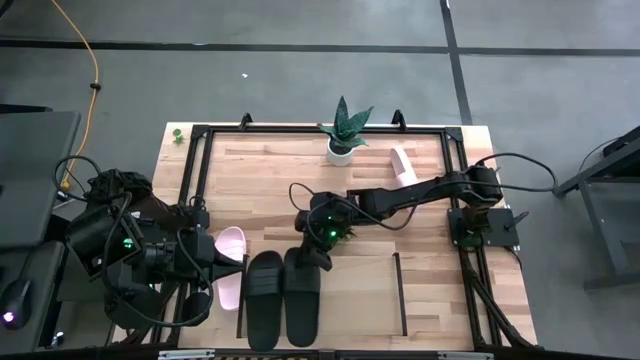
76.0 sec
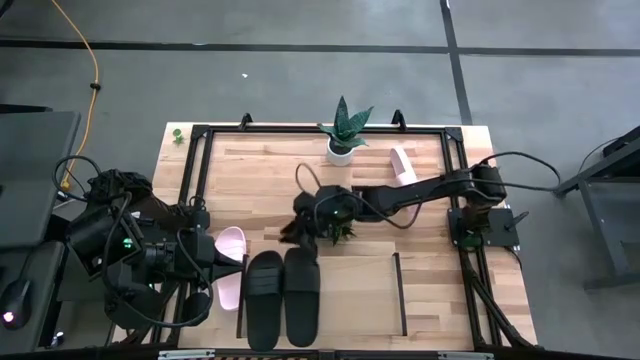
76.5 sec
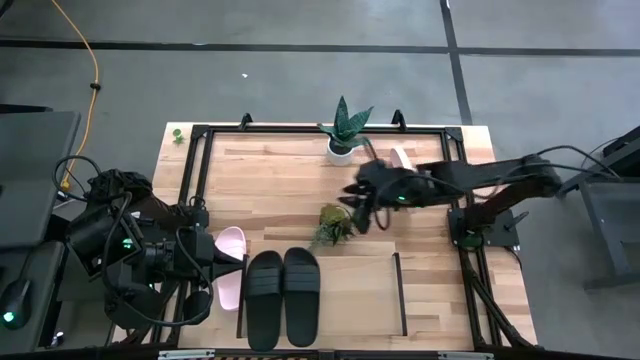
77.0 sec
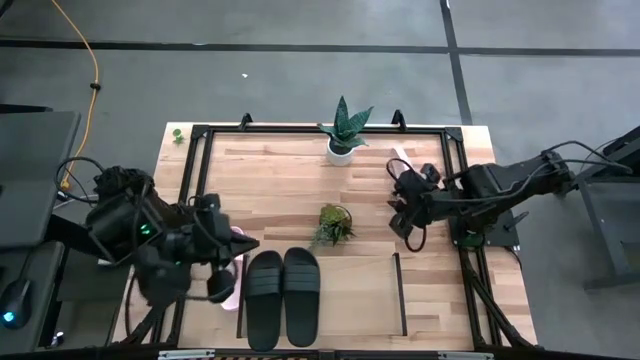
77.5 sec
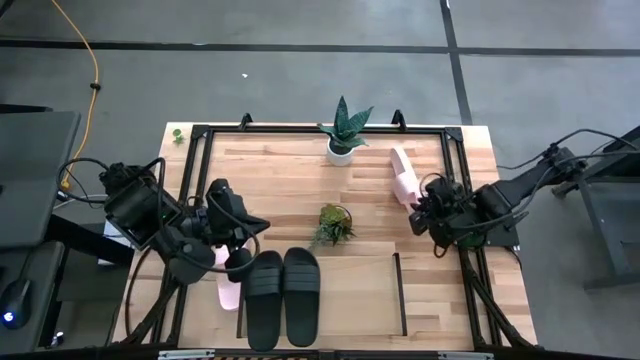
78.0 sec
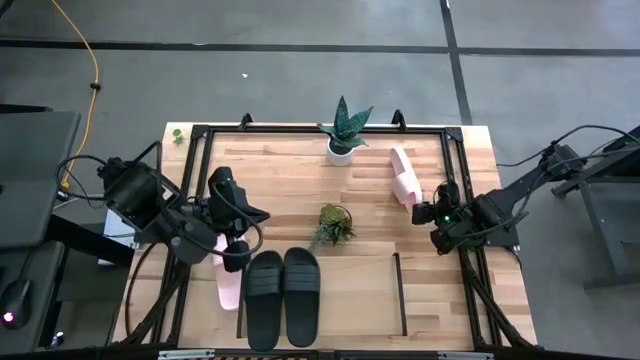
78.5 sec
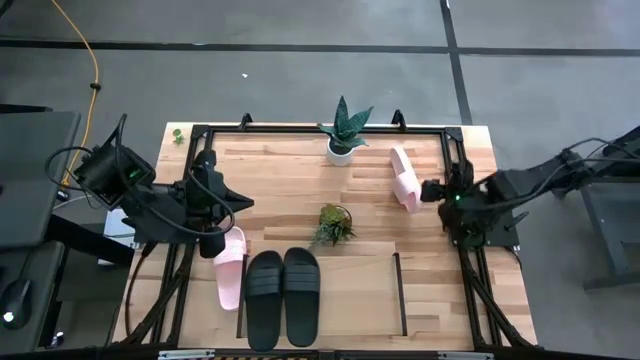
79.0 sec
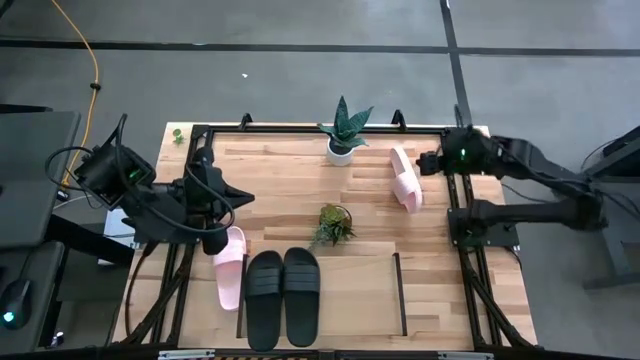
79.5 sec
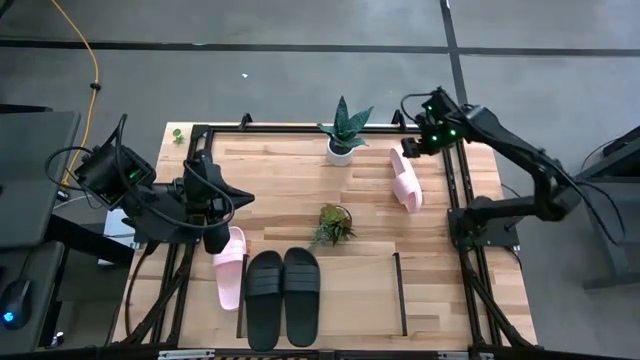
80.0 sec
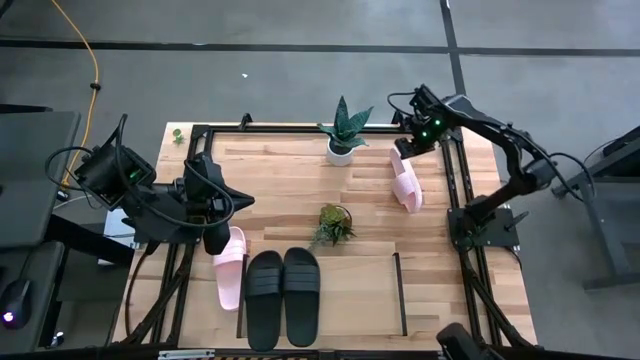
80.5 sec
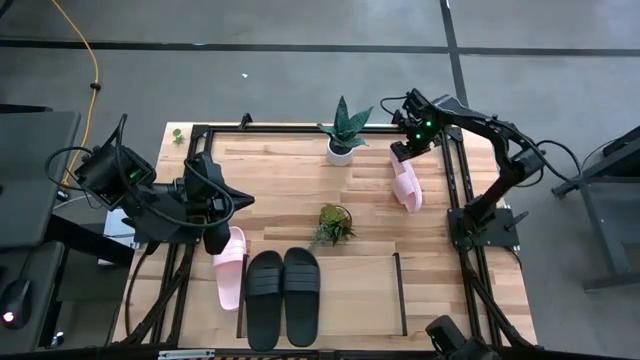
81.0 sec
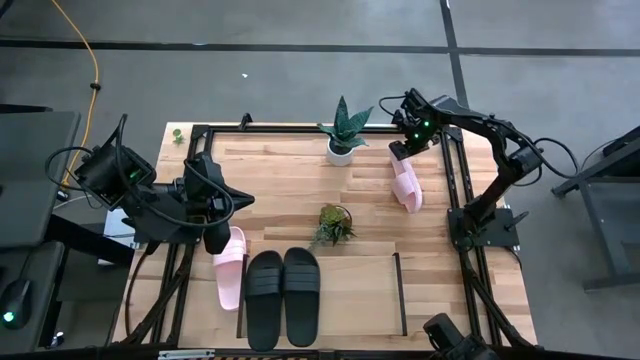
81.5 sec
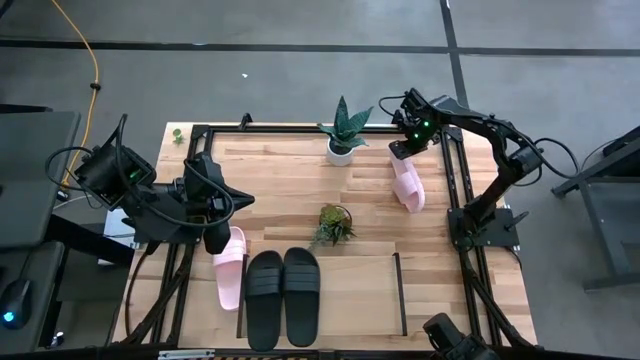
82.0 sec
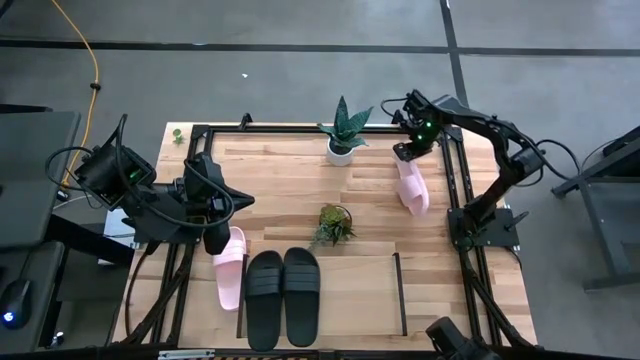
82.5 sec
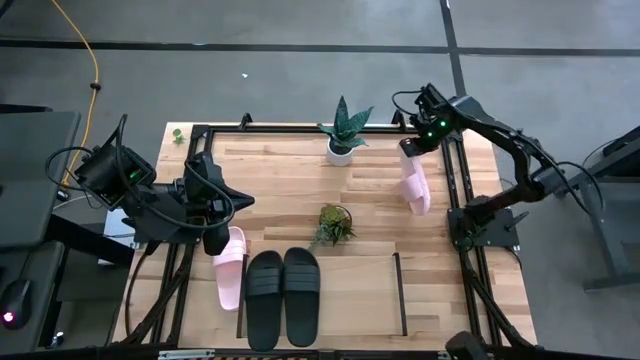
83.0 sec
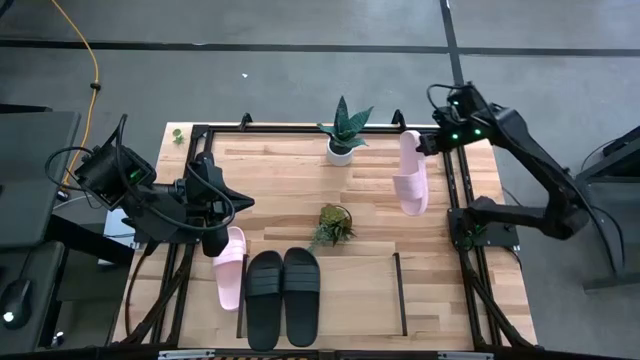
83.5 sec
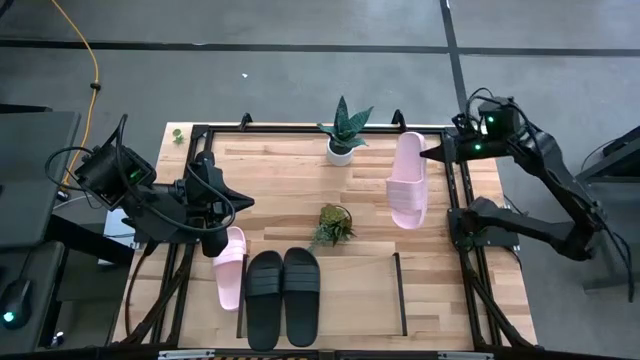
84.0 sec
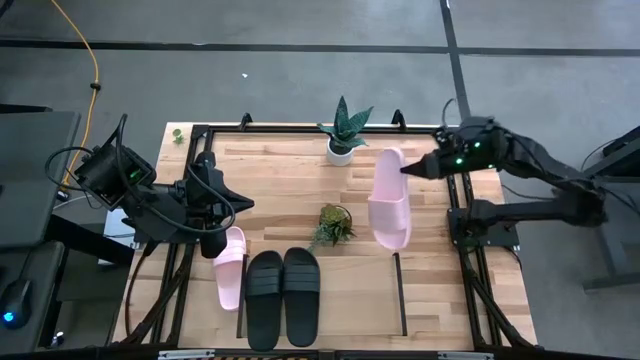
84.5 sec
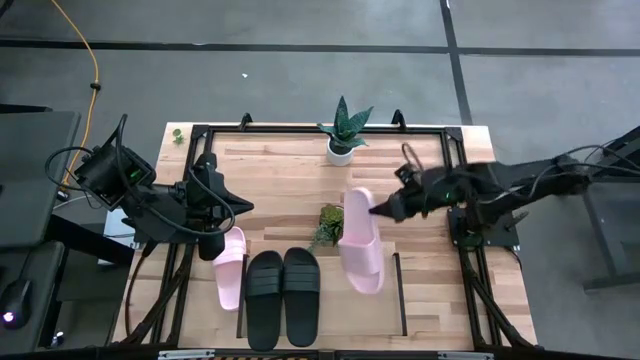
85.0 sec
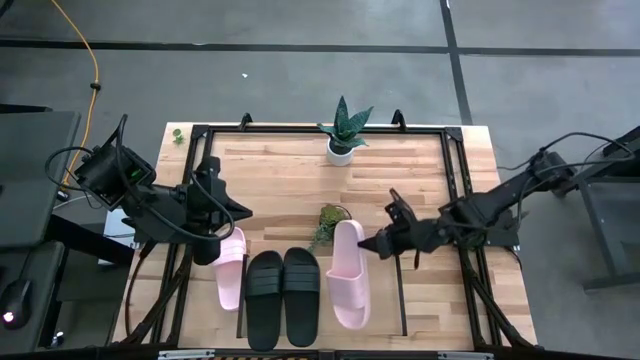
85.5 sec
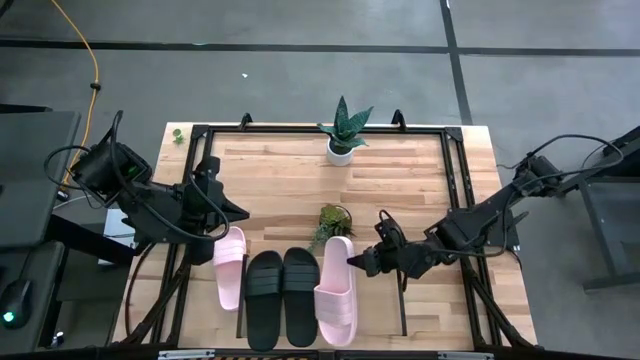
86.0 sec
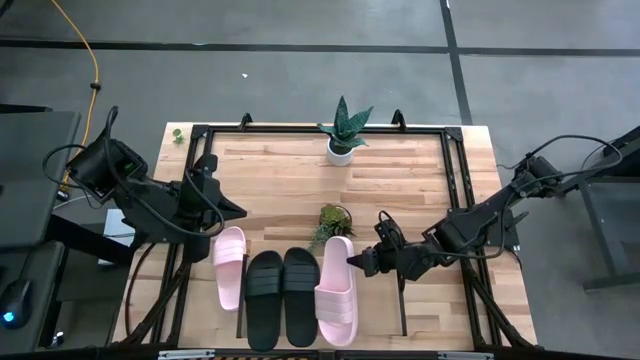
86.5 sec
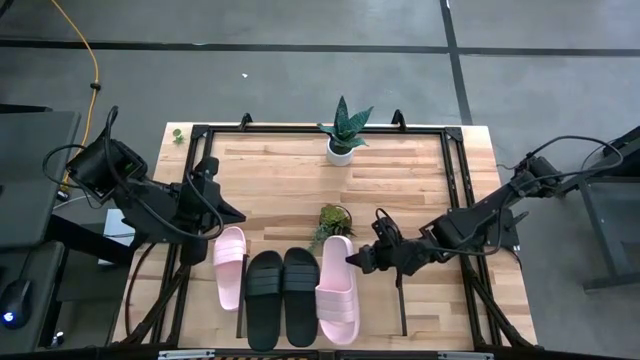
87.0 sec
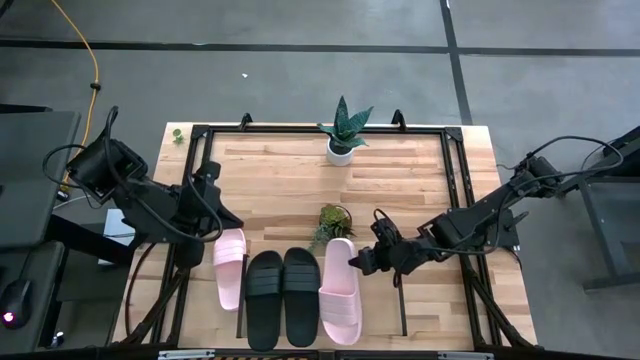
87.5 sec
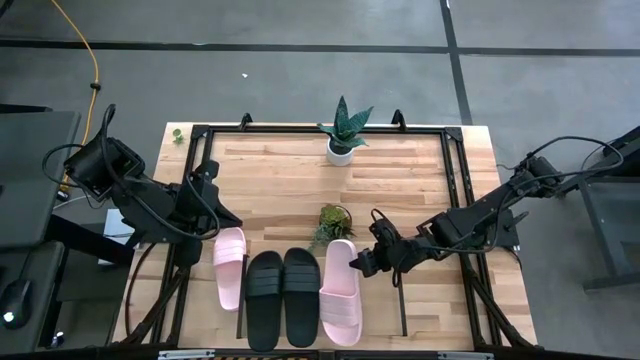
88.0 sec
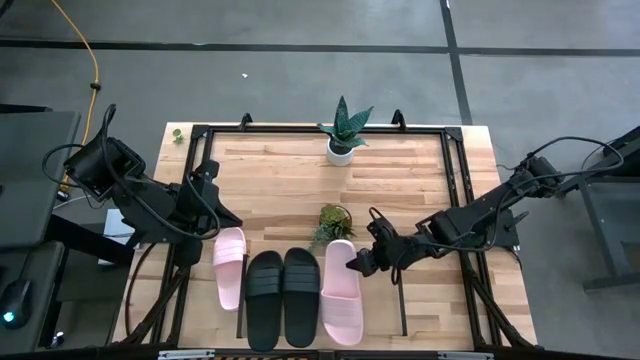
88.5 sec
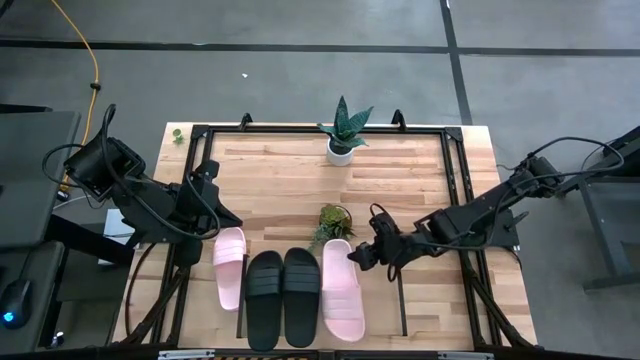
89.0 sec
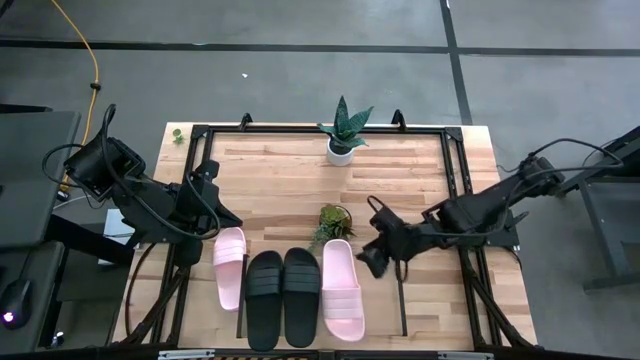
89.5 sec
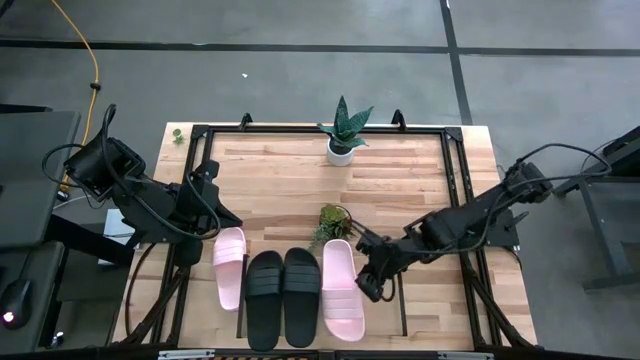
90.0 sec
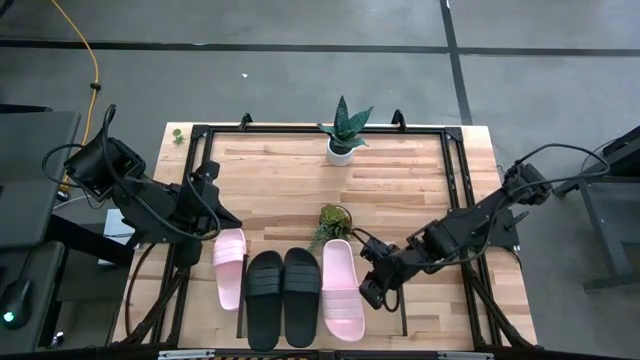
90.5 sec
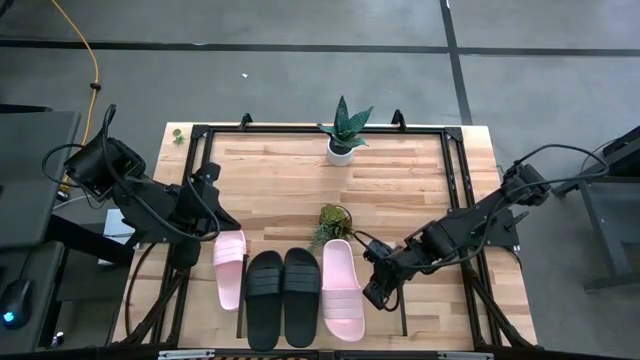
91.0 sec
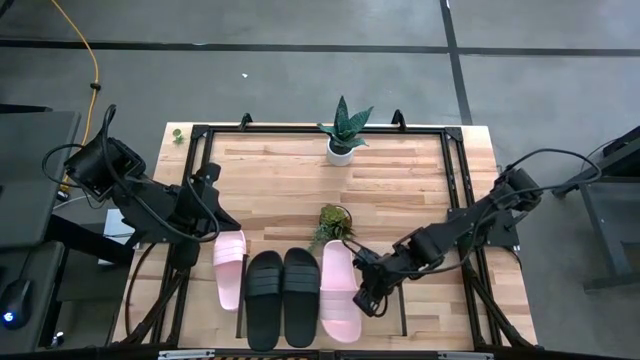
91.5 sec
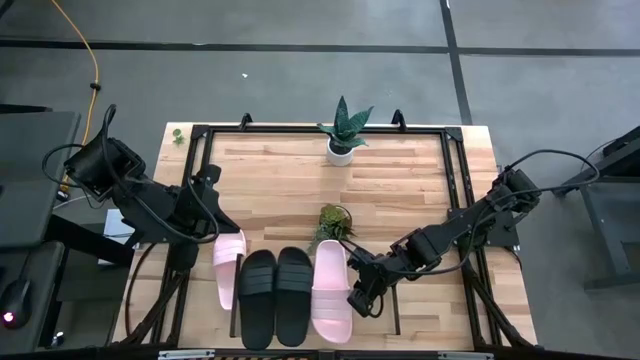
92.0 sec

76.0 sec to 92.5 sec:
Task: Pick and place slides into the shelf
Put the top pink slide on the shelf
